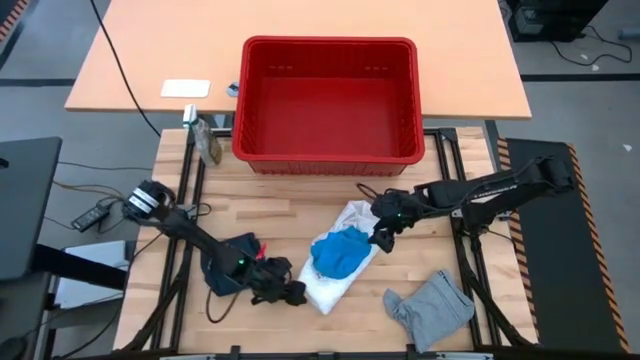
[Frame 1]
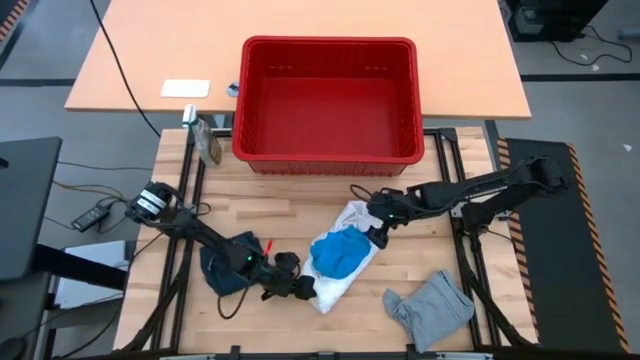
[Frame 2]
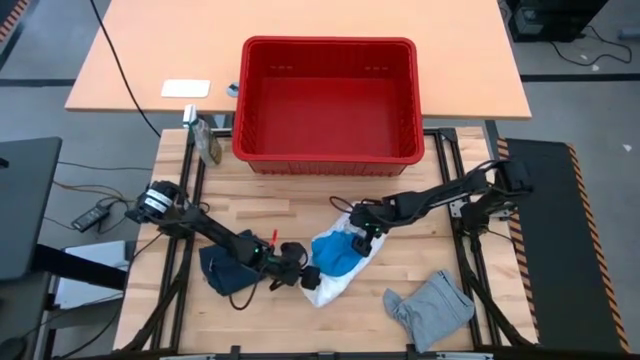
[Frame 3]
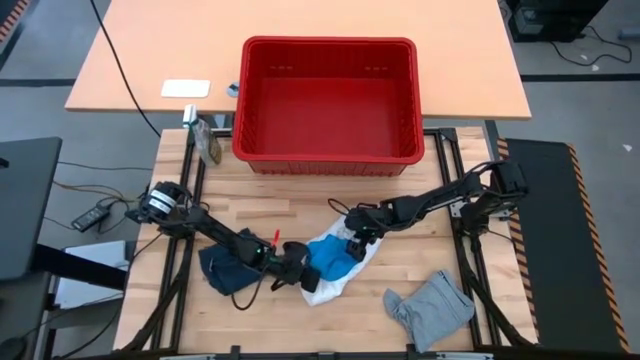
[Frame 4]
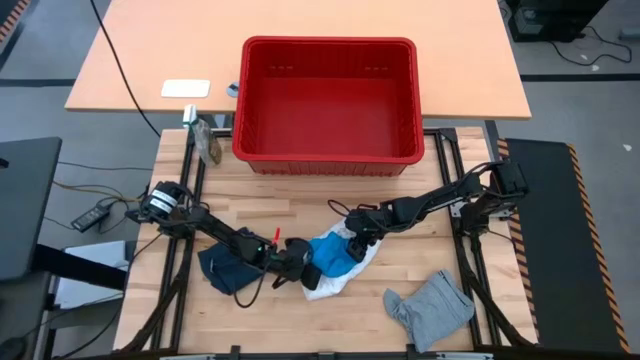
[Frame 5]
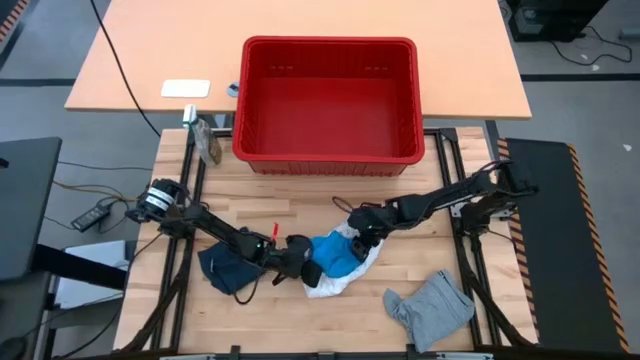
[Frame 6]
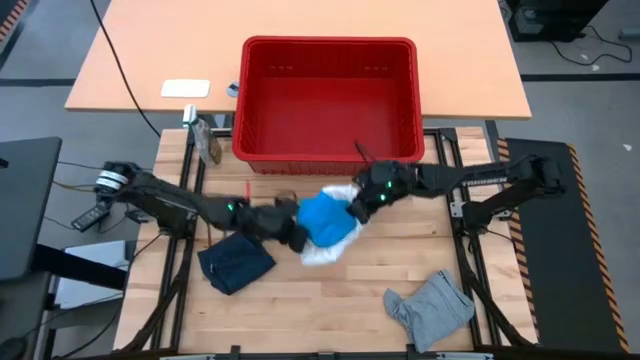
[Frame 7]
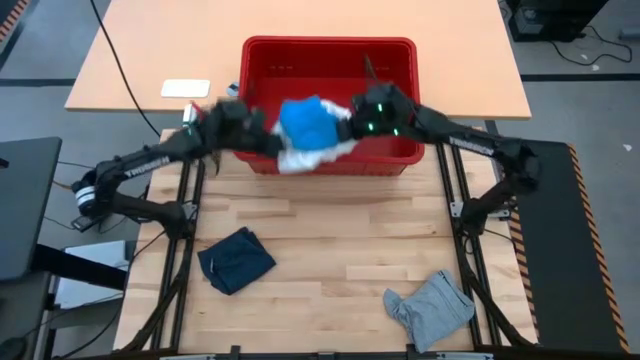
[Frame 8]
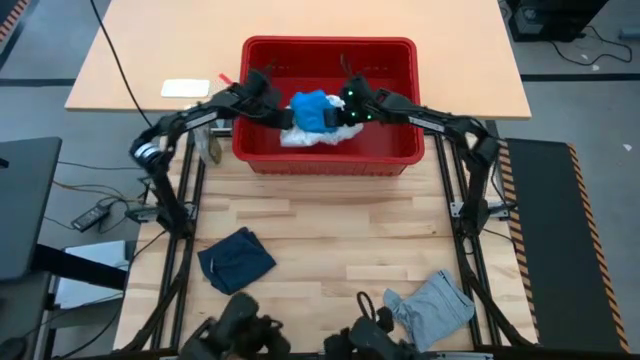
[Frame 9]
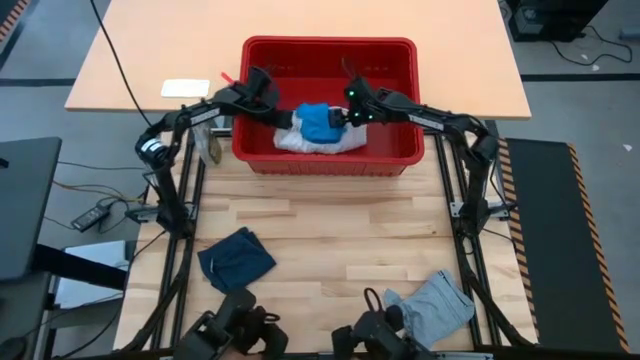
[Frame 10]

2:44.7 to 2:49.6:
Task: Fold laundry
Put the stacked folded clothes into the red laundry bin

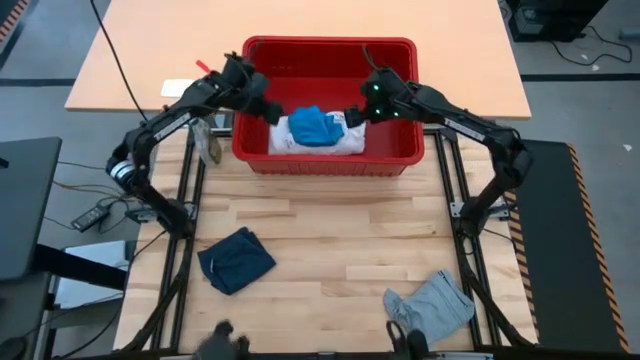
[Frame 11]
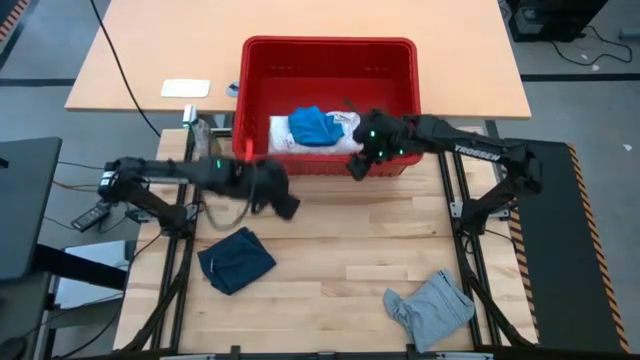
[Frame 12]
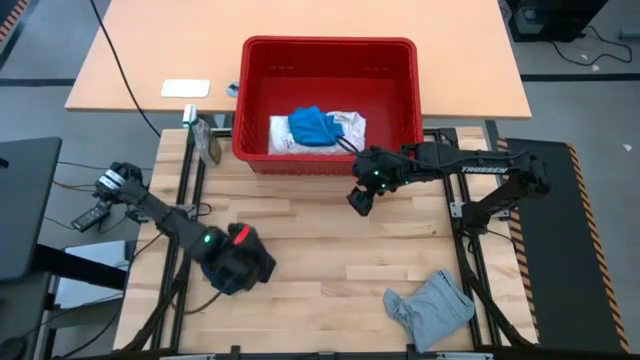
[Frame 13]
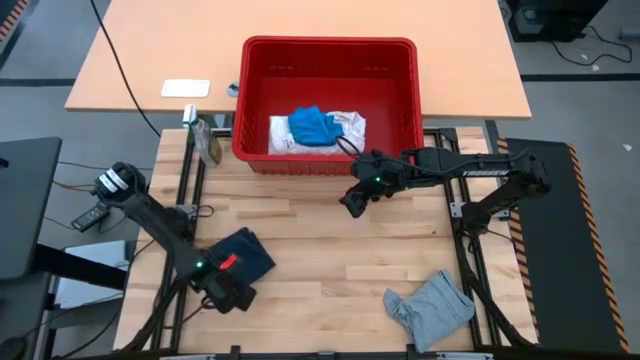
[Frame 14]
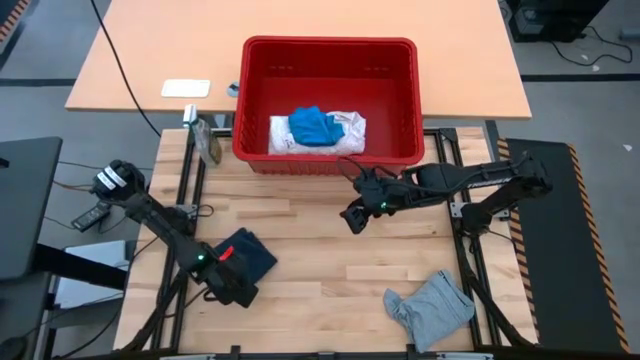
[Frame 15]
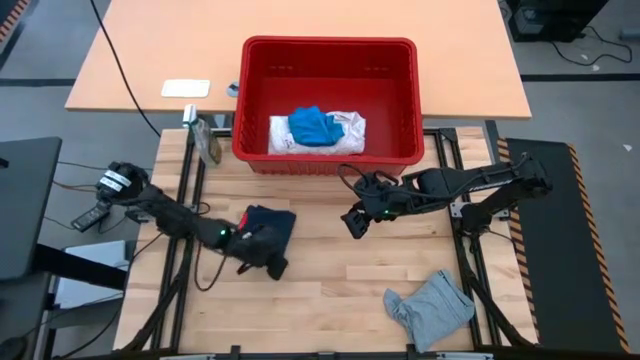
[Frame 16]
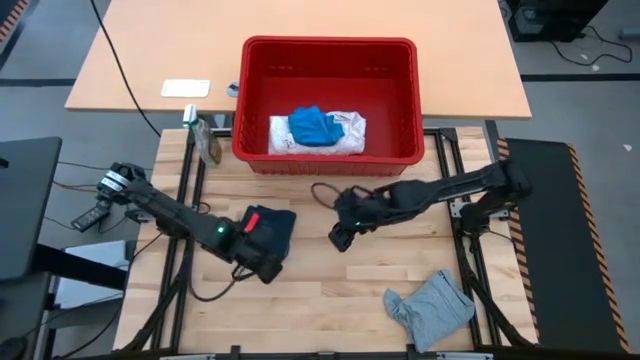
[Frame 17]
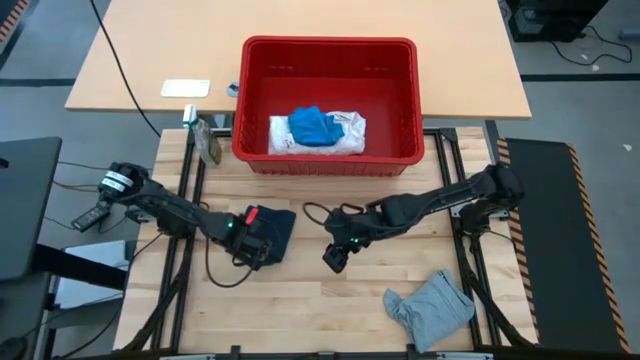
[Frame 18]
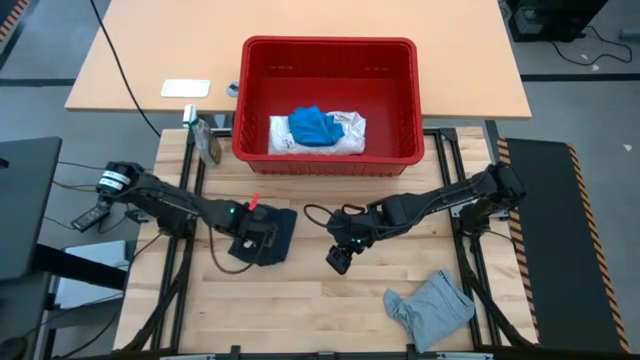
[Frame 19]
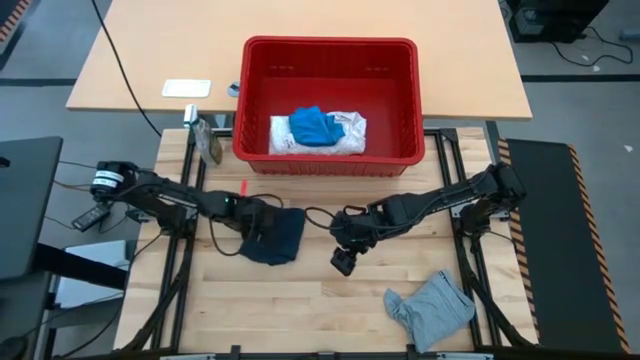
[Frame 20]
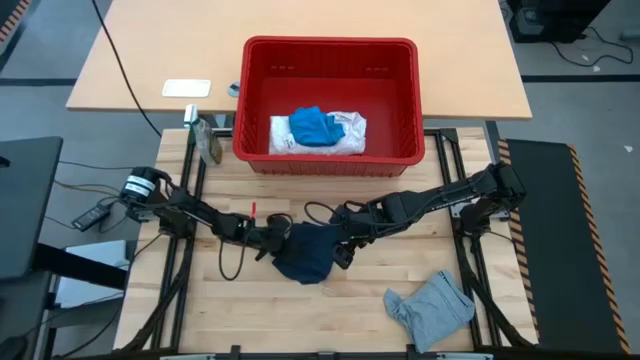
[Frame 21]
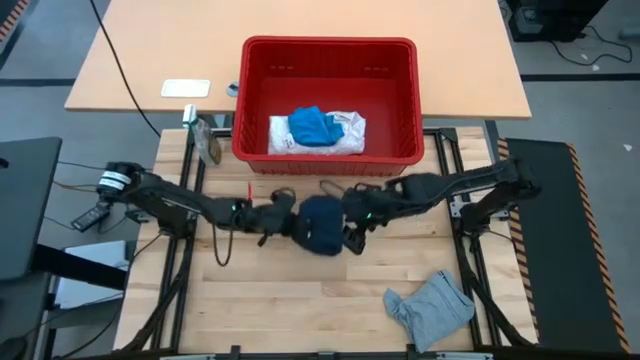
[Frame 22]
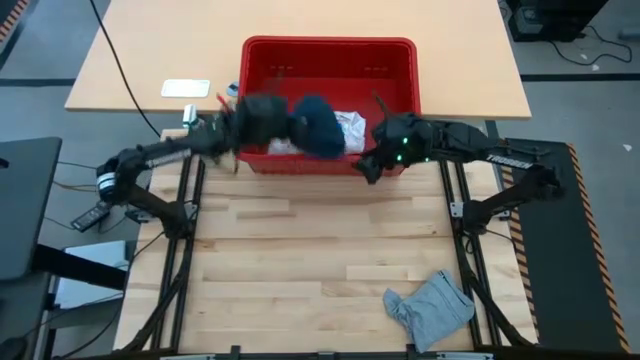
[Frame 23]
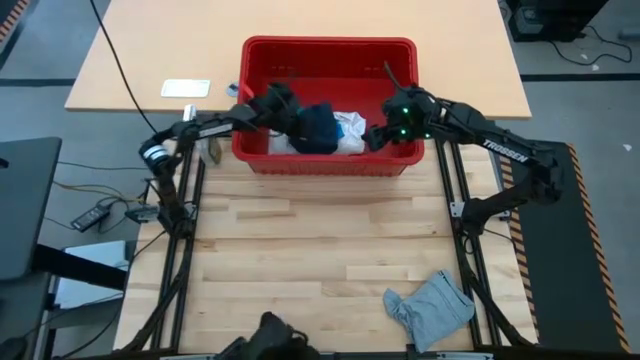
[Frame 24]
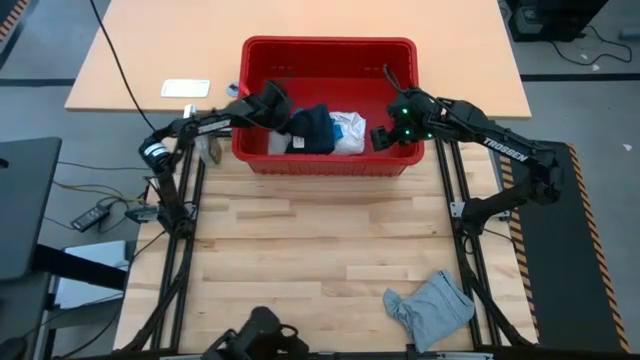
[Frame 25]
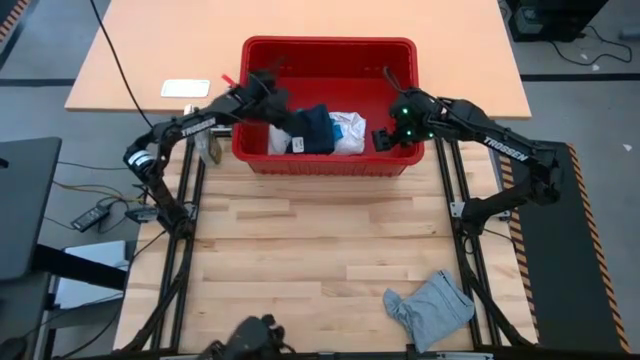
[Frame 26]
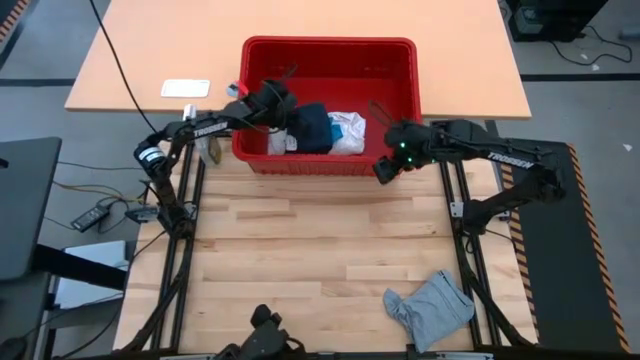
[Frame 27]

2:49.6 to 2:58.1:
Put the folded dark blue shorts into the red laundry bin

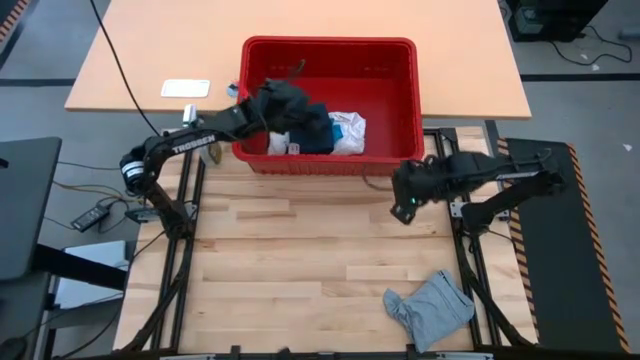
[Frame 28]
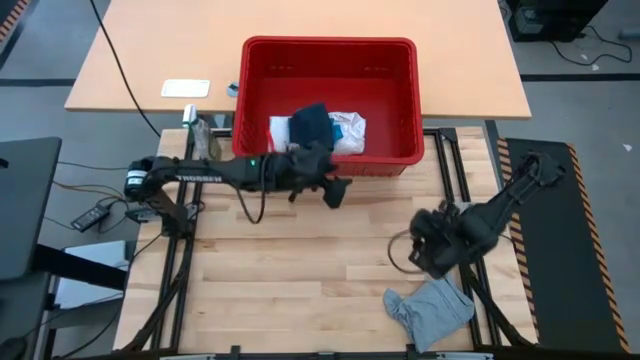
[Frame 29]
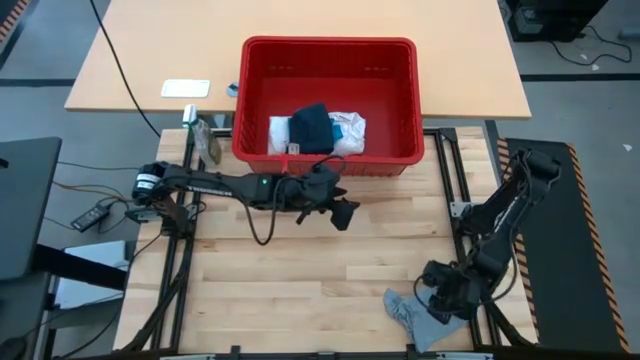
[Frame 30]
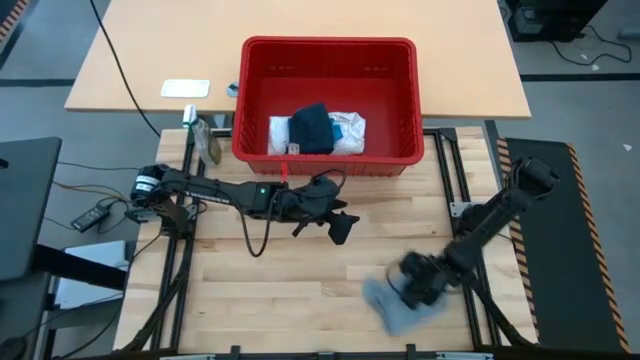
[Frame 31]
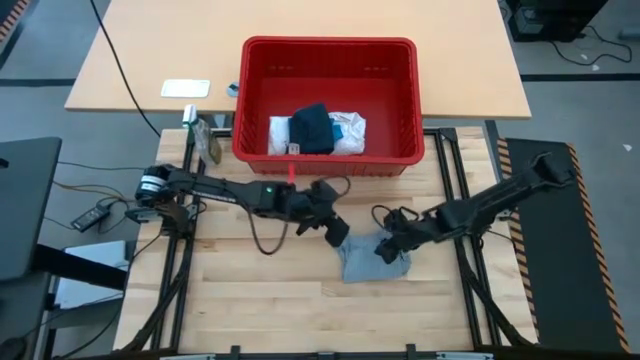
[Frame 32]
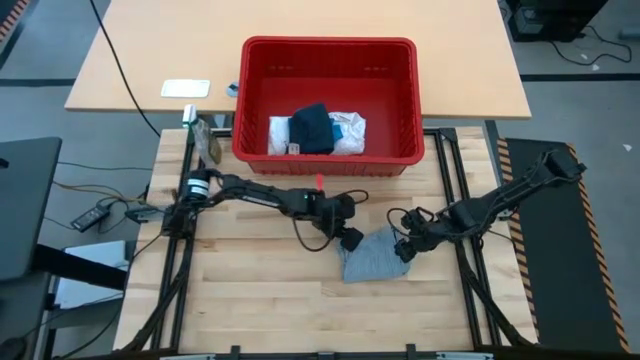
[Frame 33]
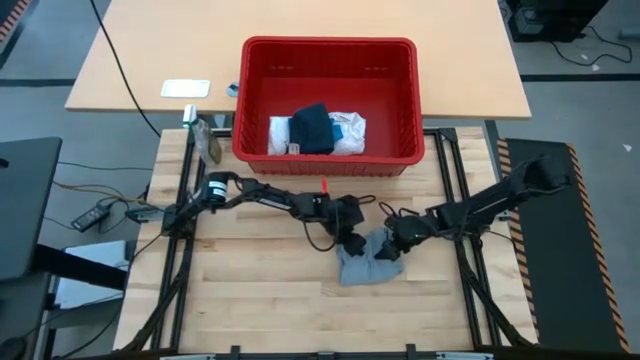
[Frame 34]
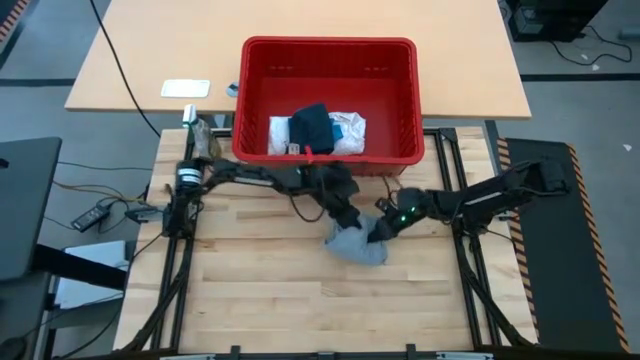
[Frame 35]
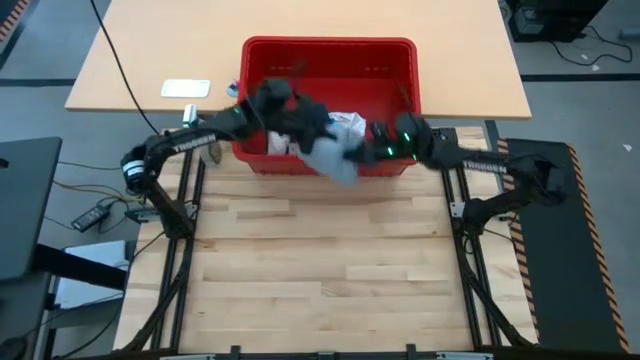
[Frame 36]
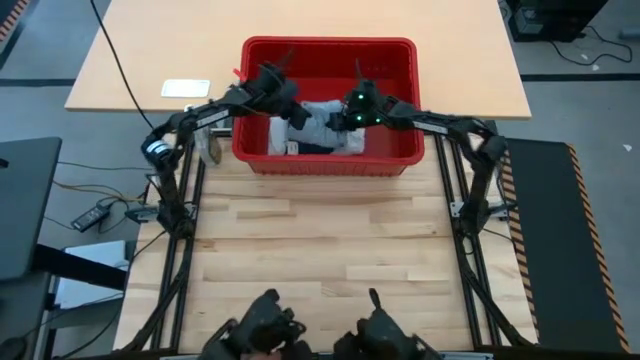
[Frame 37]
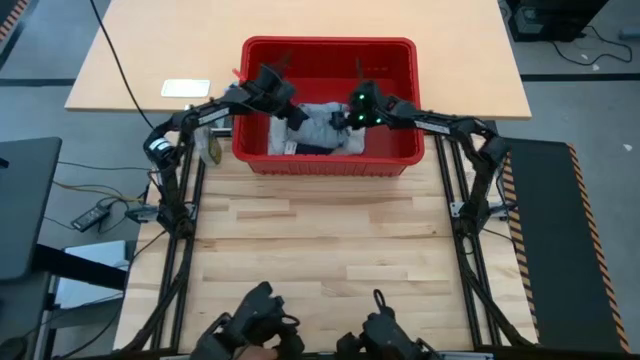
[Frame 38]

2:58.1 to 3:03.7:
Put the folded gray shirt into the red laundry bin

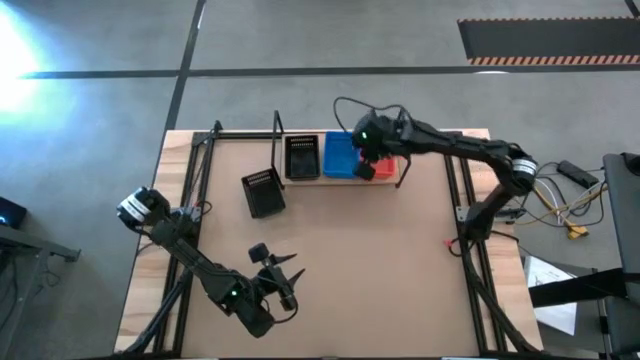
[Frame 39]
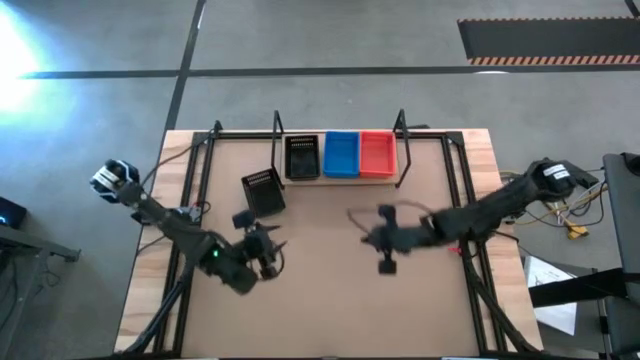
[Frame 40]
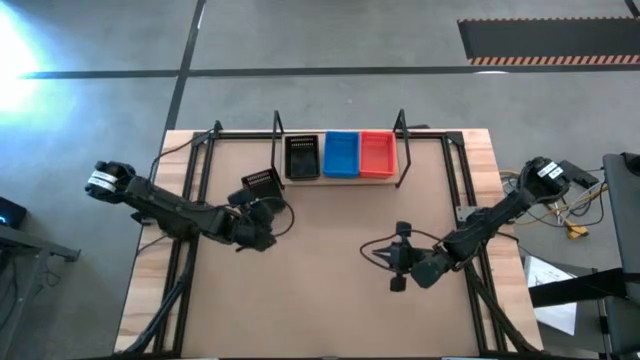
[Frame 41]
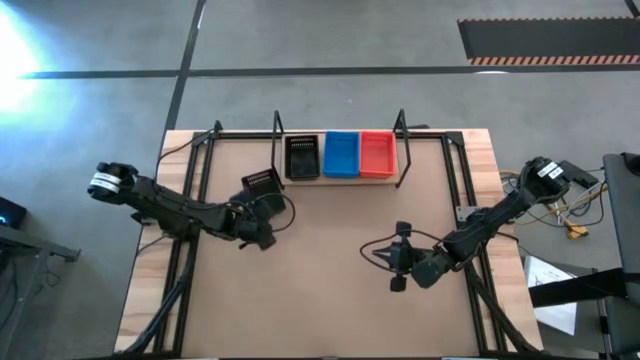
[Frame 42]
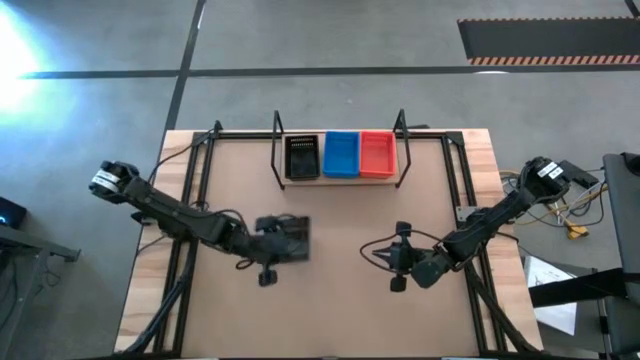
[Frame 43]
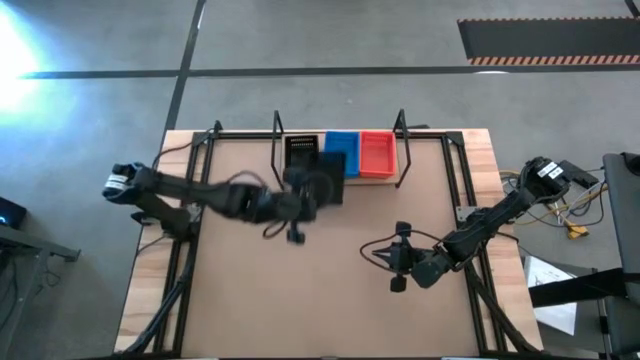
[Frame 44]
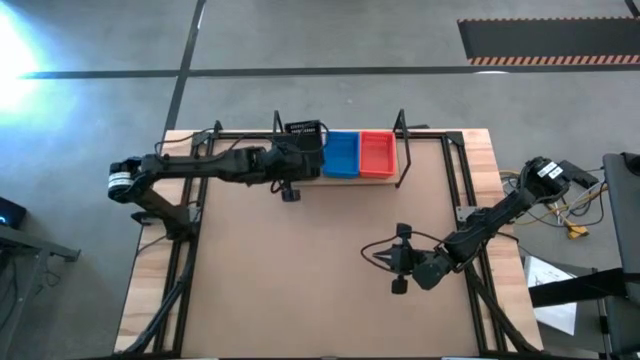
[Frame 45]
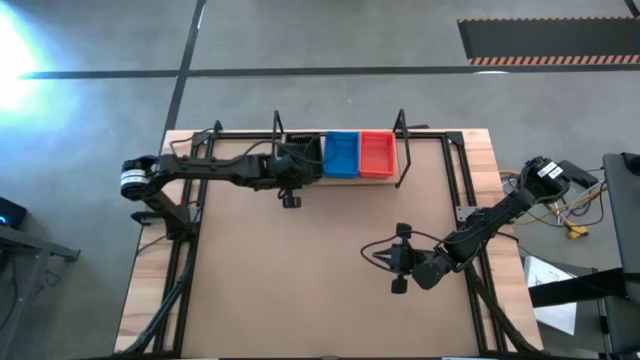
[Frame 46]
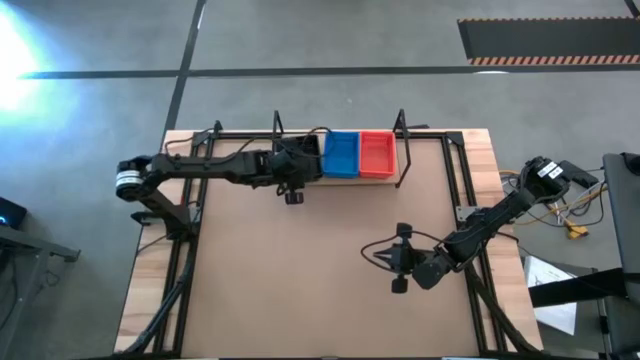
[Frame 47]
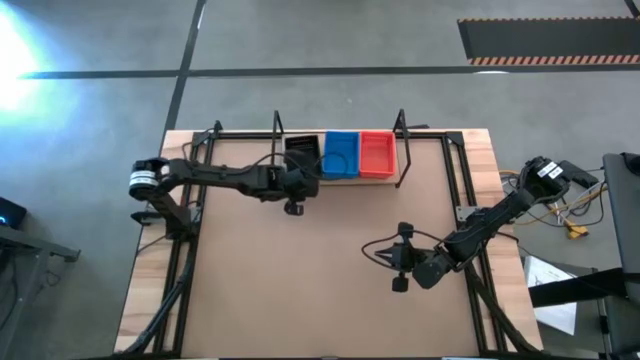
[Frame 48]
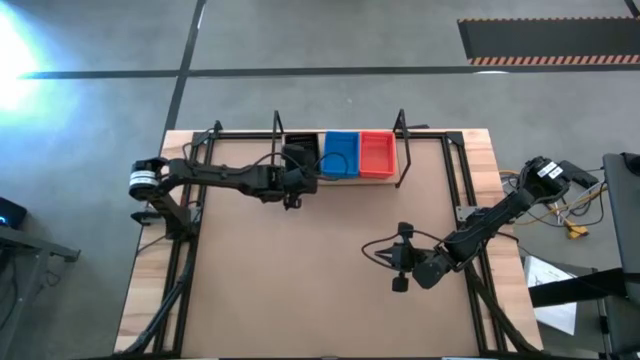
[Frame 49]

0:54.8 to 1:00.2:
Task: Stack baskets on shelf by color
Stack the black bin on the black bin on the shelf
